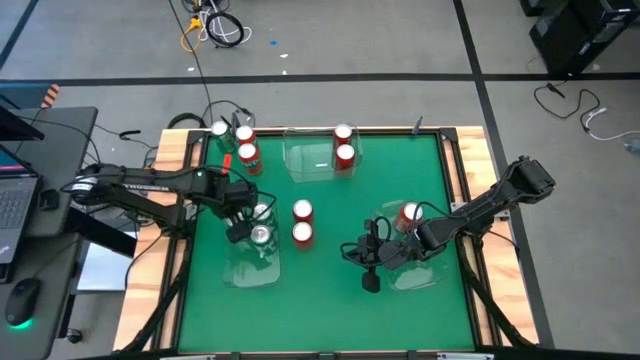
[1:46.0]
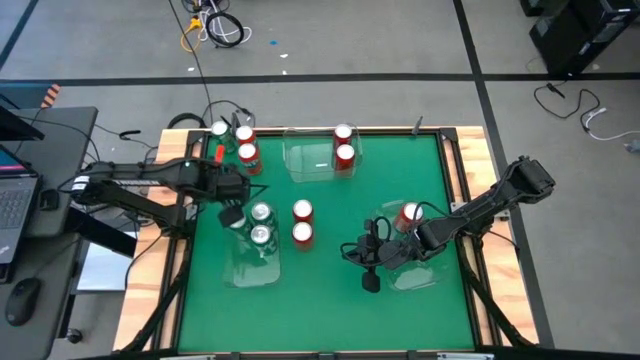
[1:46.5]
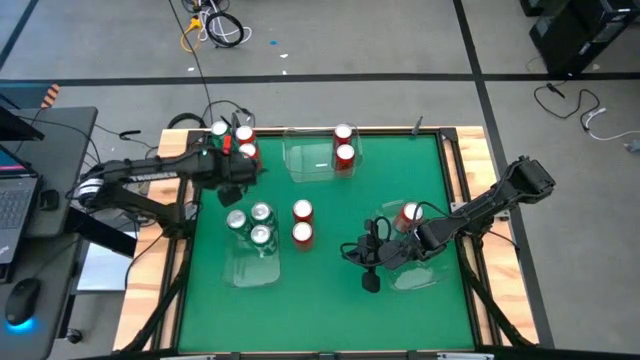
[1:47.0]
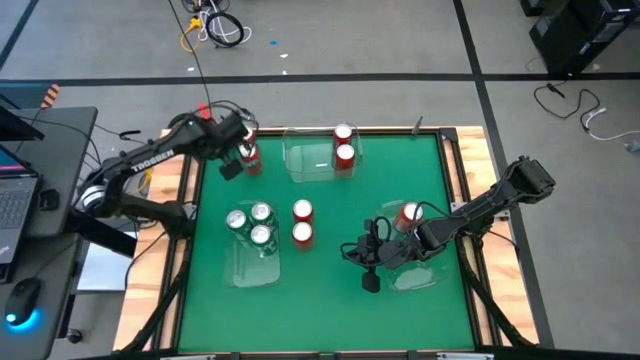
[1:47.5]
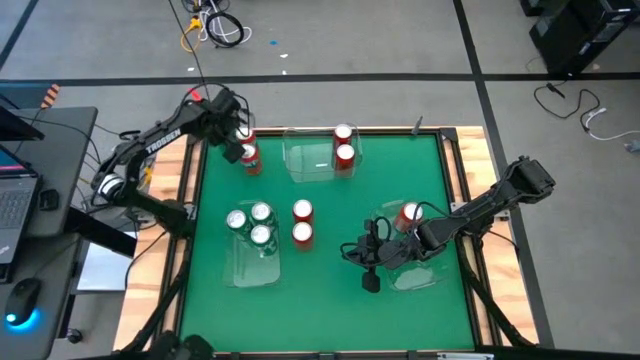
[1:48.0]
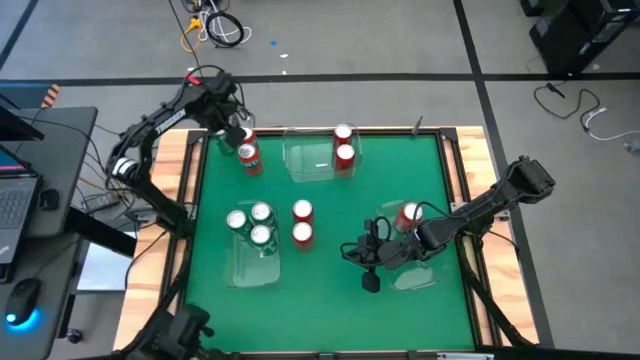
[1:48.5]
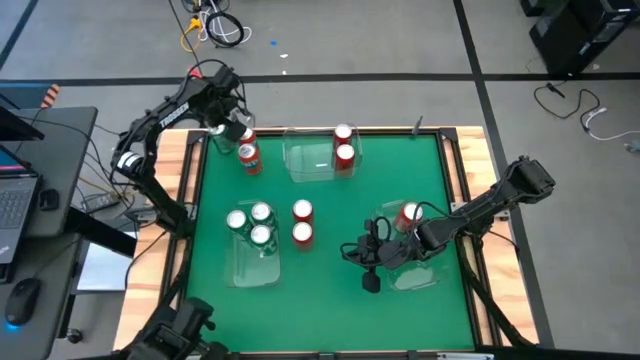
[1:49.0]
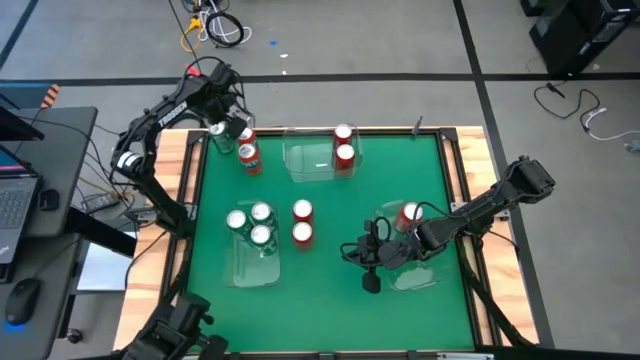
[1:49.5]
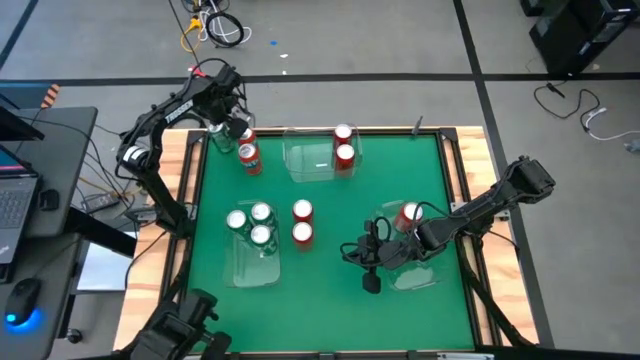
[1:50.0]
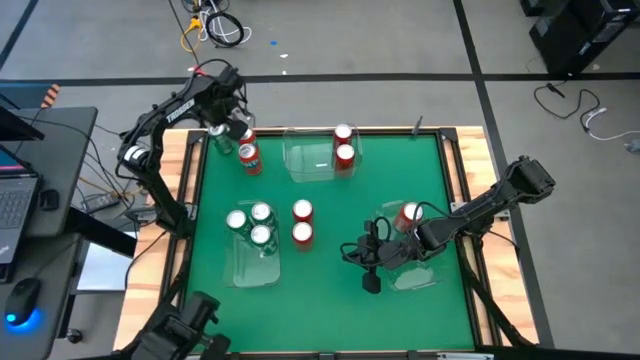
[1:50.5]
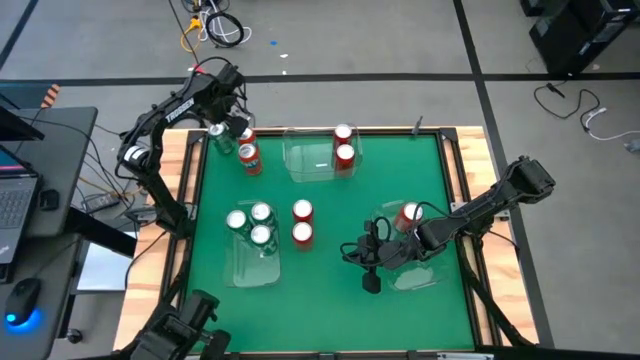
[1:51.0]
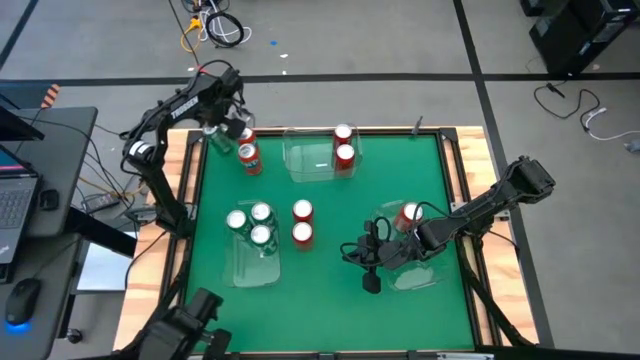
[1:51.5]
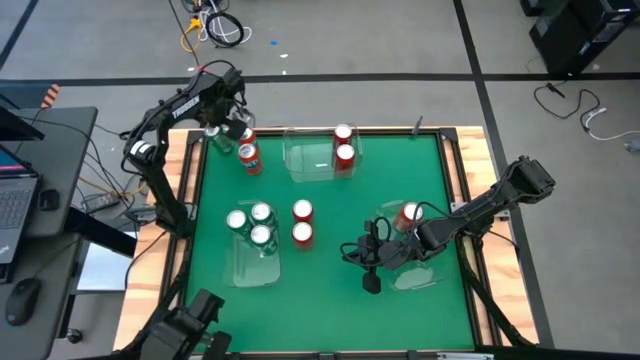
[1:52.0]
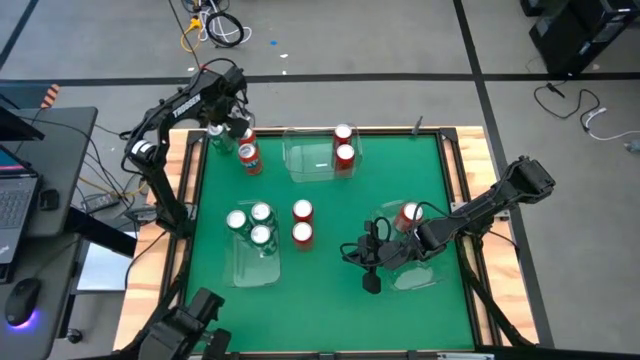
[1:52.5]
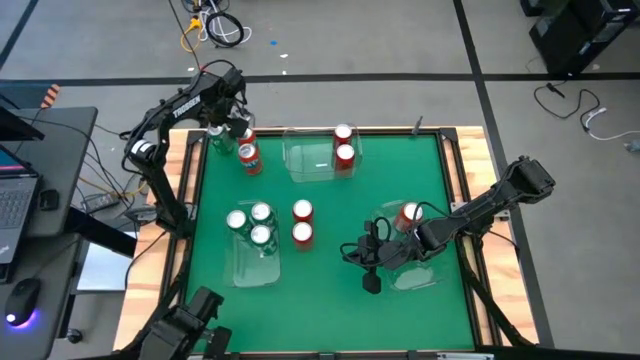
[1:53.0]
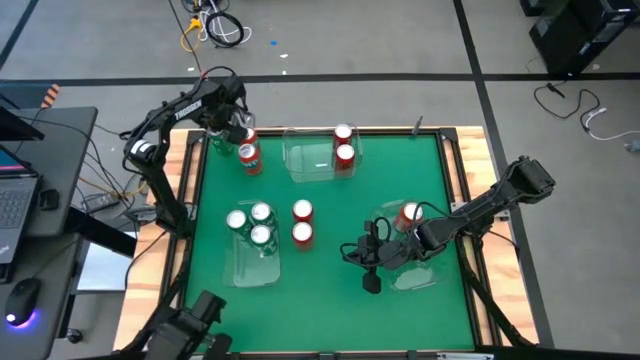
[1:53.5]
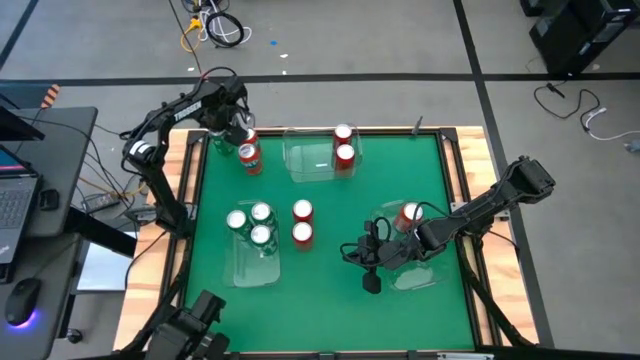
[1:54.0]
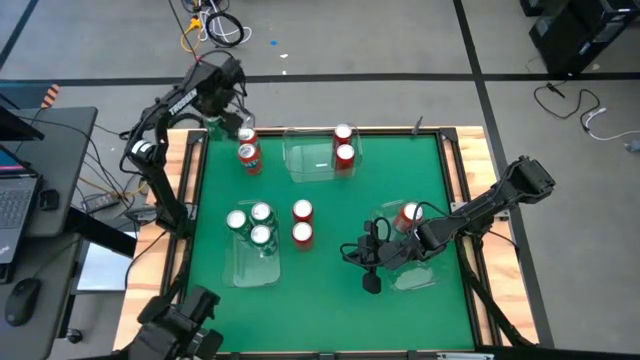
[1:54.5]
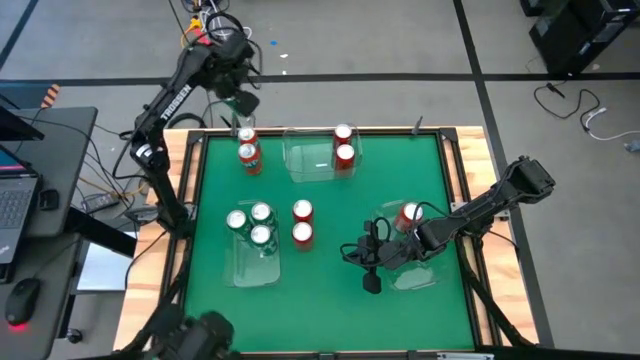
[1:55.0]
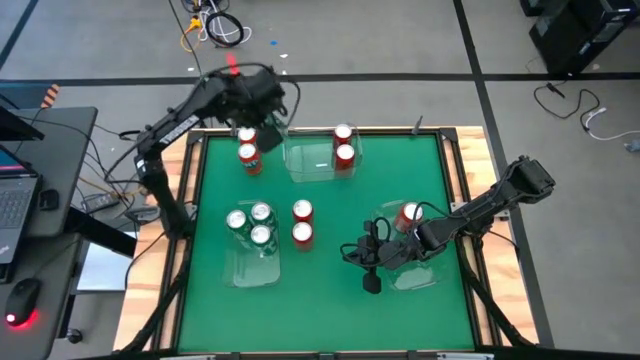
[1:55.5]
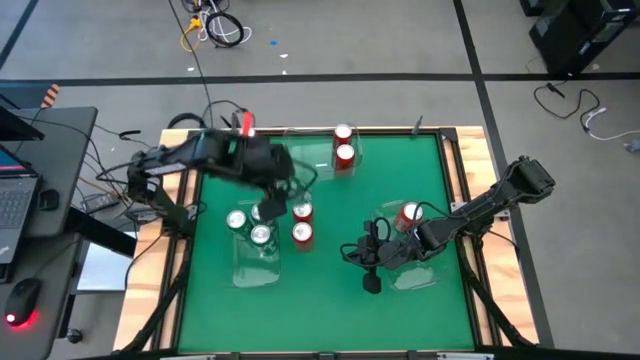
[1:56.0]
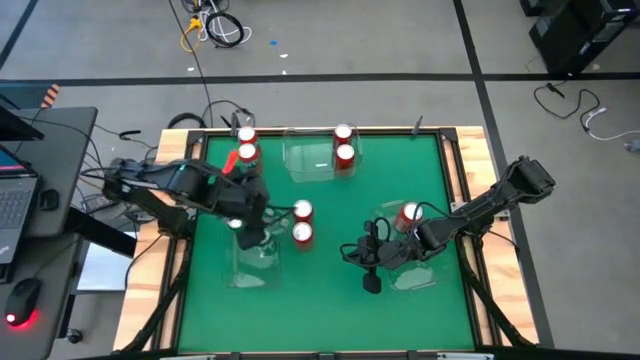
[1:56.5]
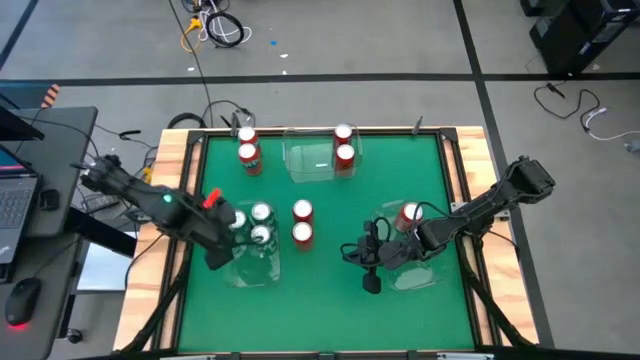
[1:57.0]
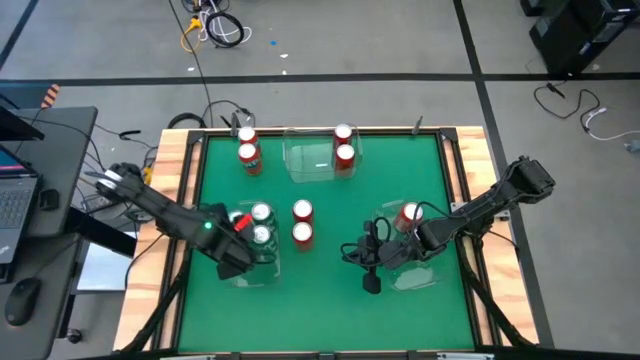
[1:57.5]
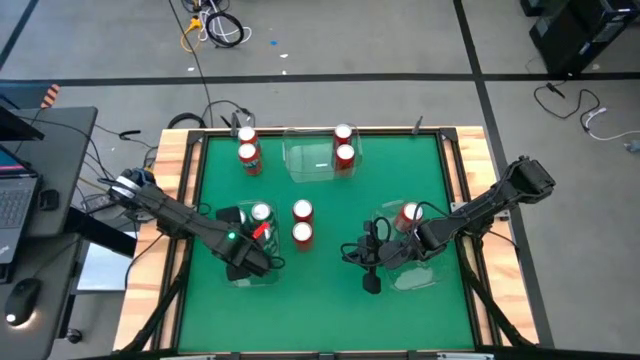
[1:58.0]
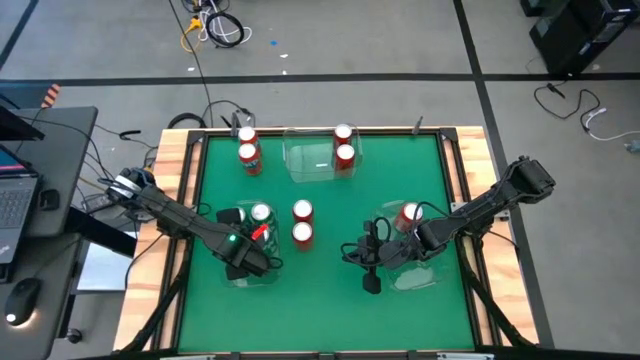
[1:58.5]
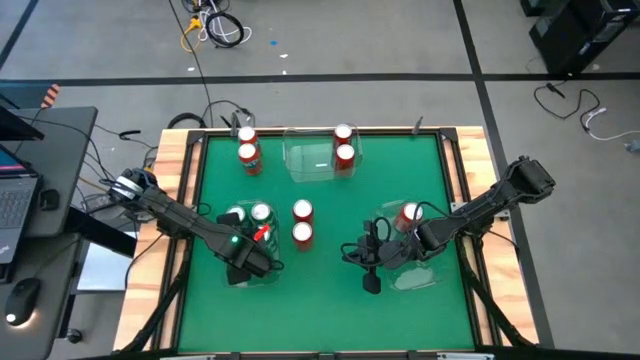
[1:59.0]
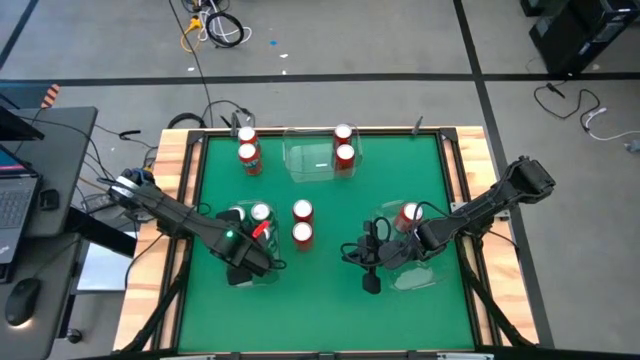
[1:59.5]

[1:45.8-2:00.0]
Task: Sort soda cans
Put the green soda can into the middle left transparent bin

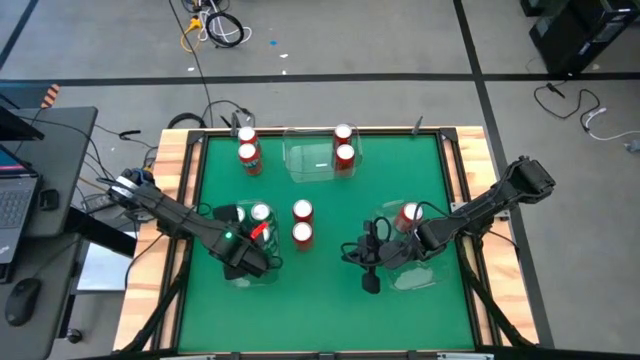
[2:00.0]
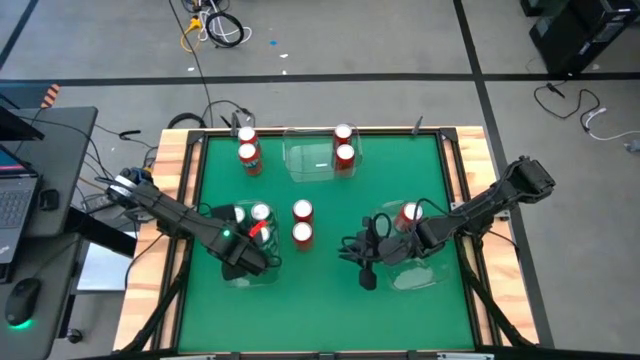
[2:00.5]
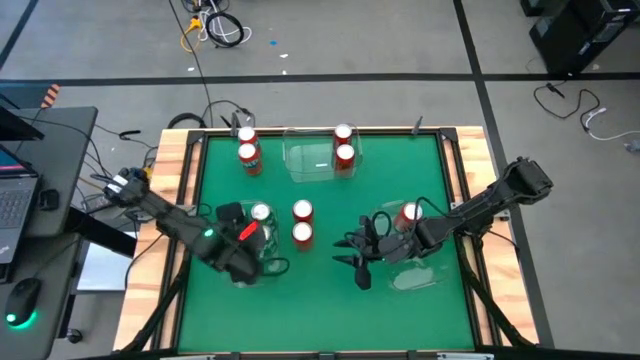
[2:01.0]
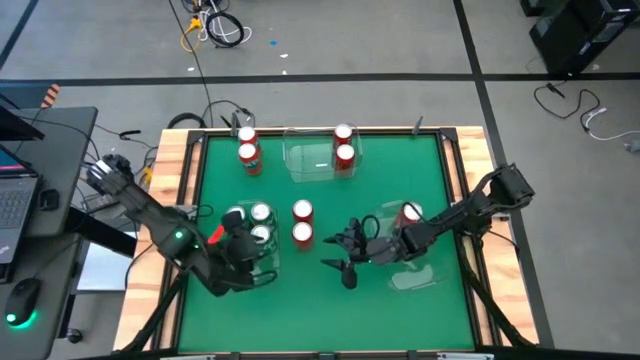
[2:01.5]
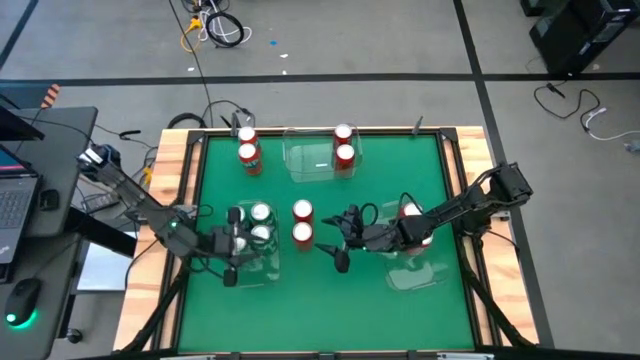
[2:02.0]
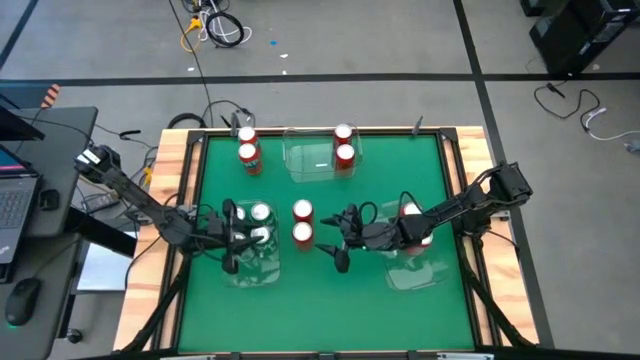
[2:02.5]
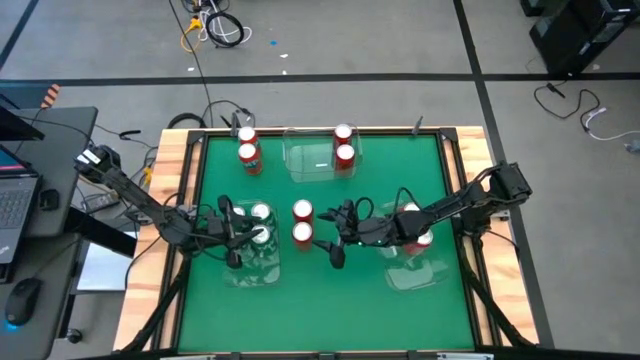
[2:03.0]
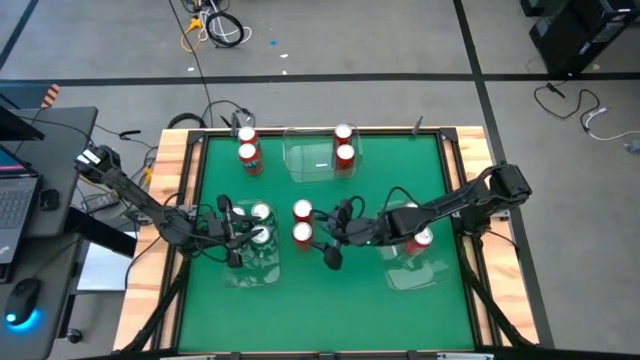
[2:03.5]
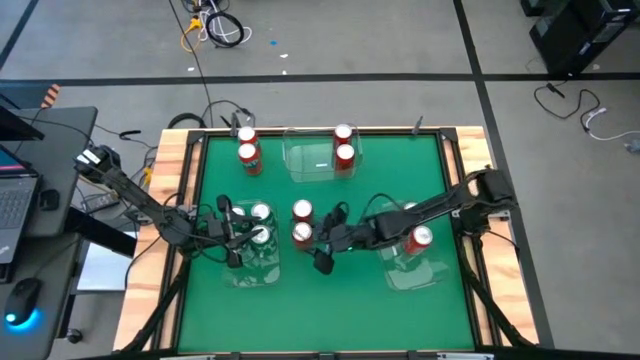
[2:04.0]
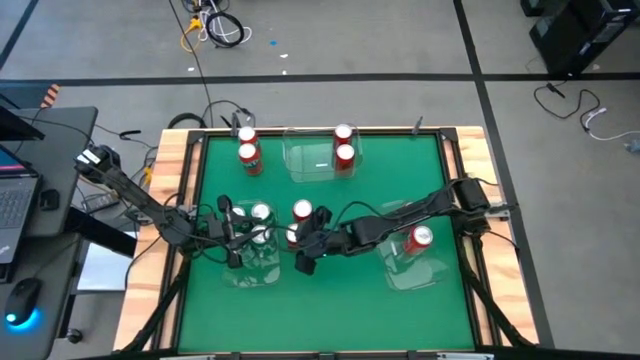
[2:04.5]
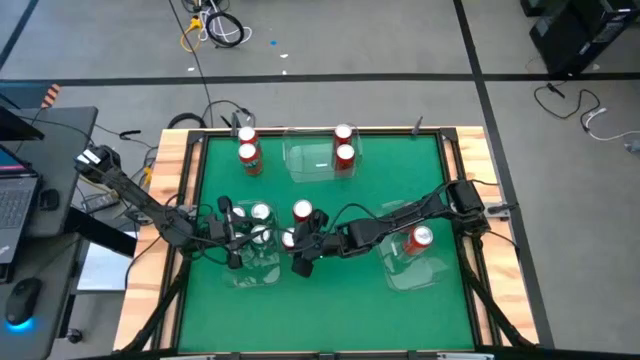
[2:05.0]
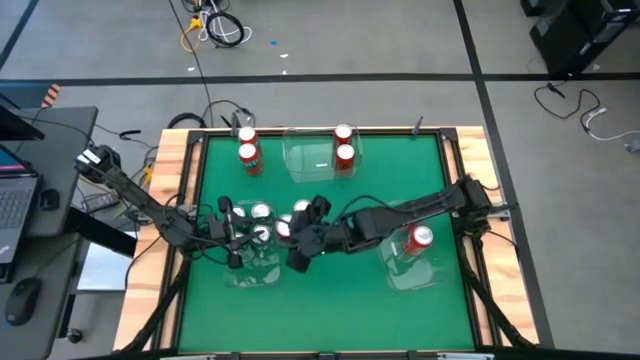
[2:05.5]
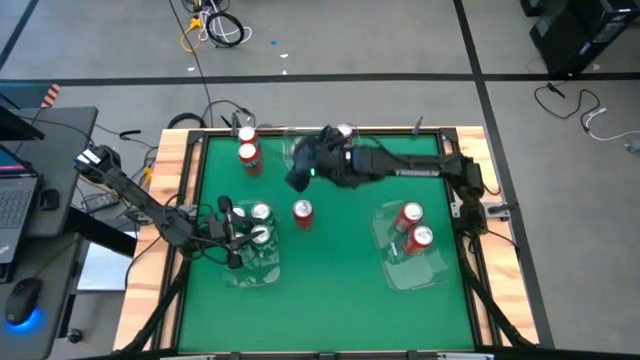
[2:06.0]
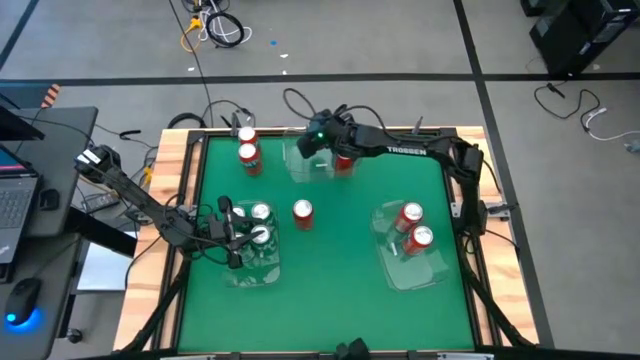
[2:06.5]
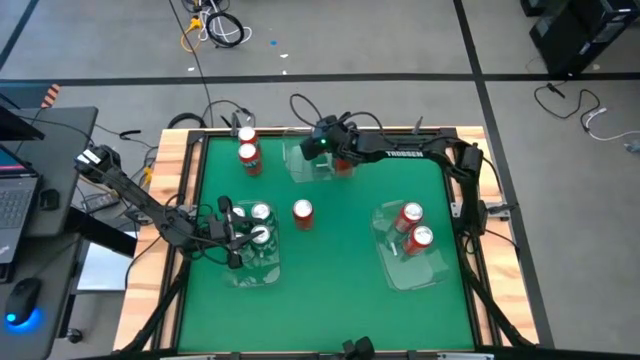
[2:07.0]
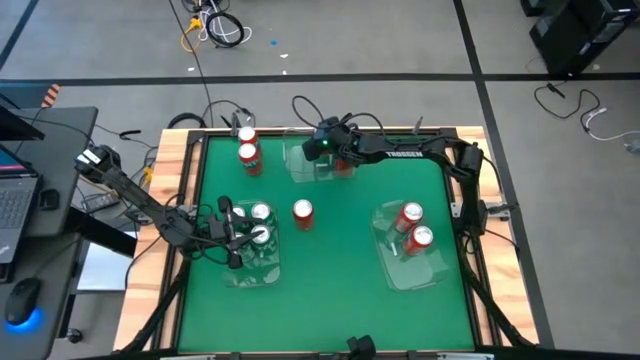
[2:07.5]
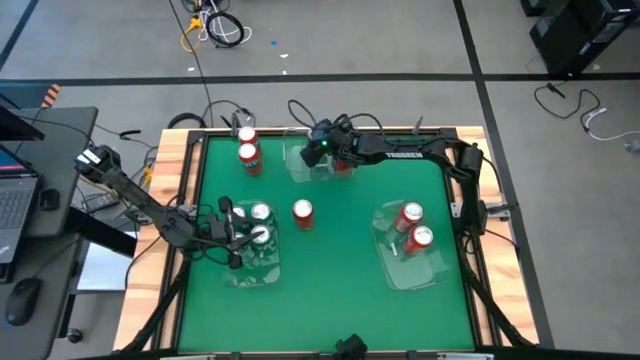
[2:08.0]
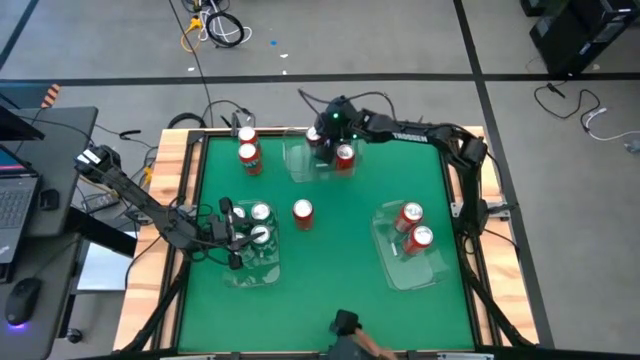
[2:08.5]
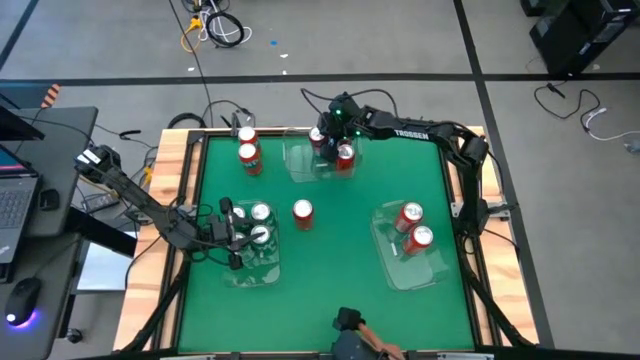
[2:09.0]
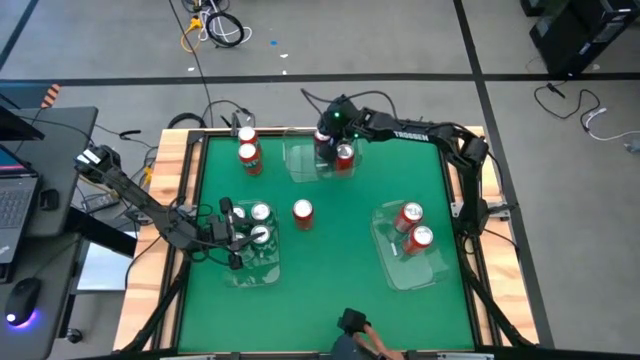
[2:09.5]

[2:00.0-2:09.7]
Put the red-black soda can into the top transparent bin
